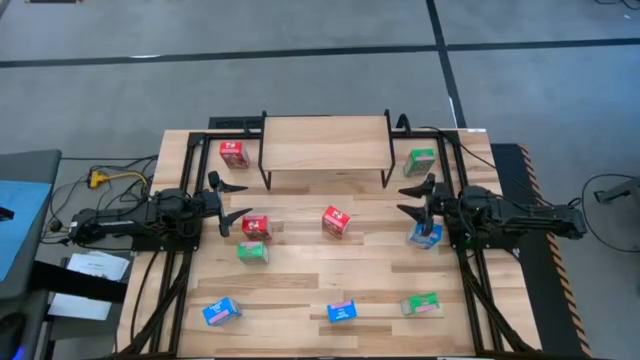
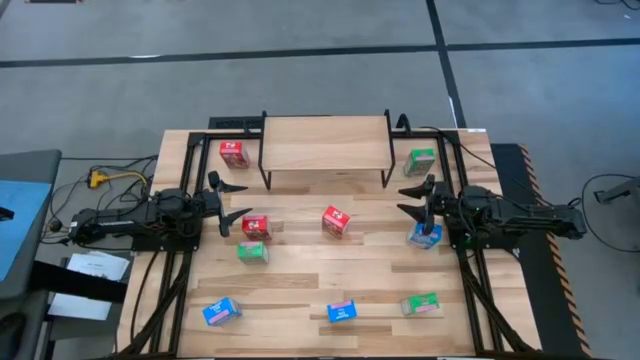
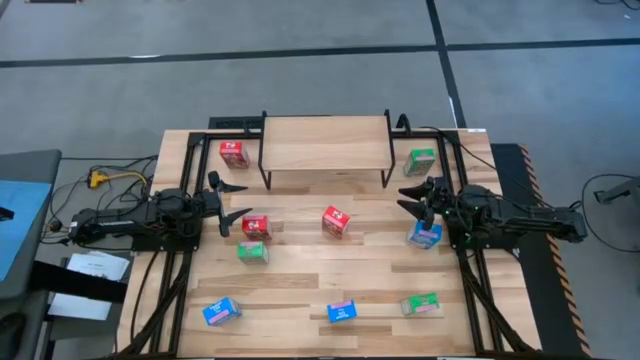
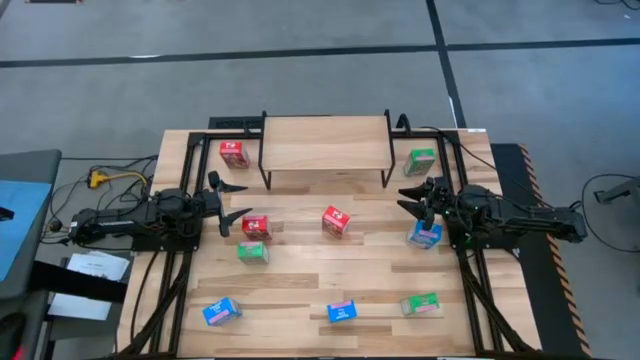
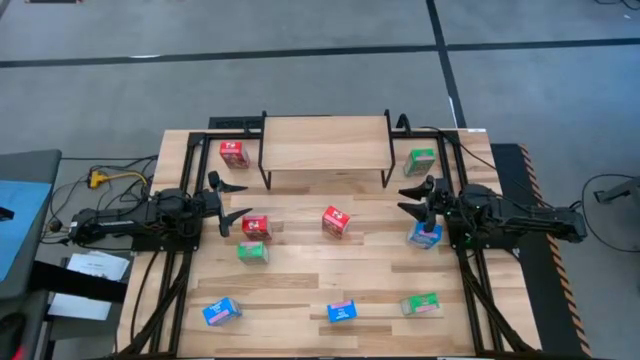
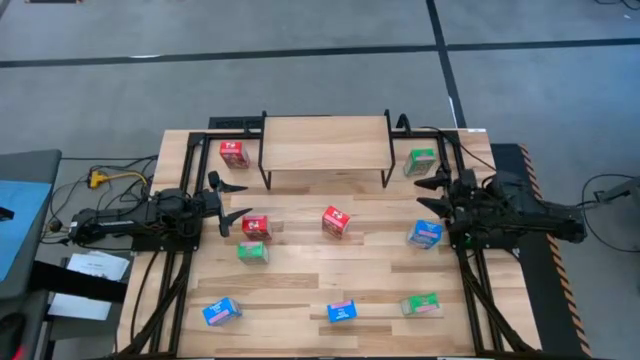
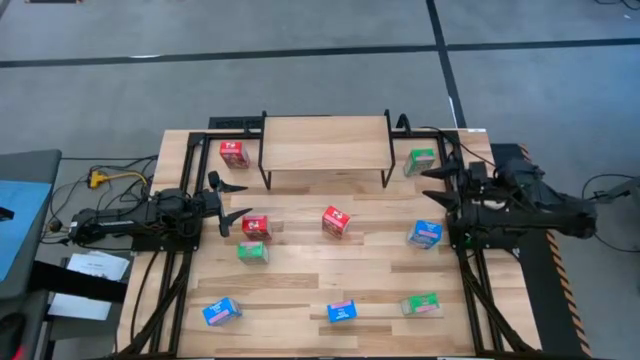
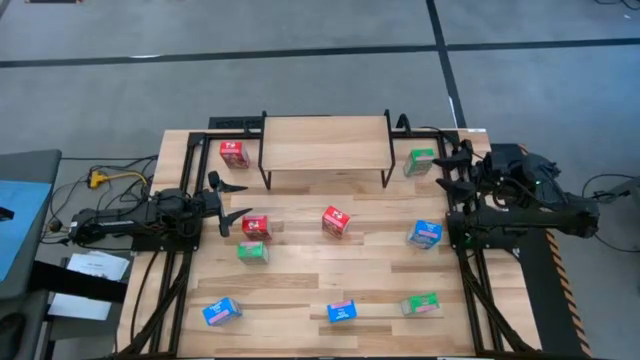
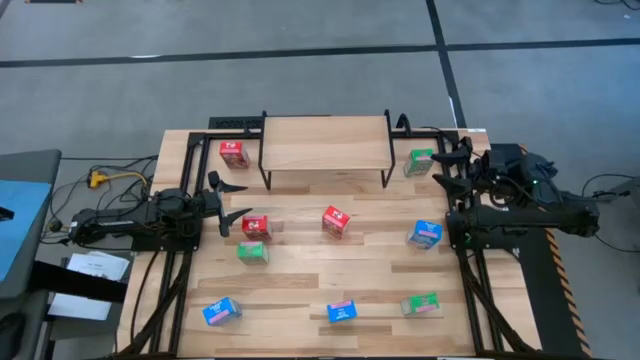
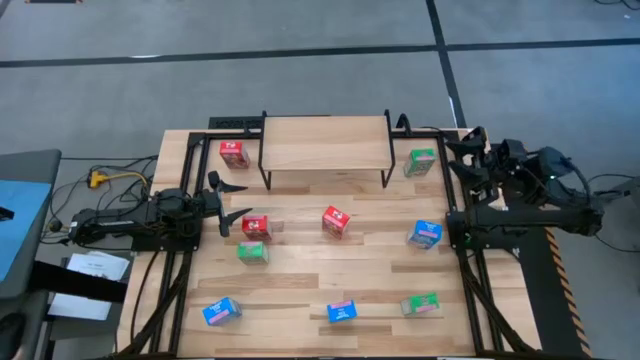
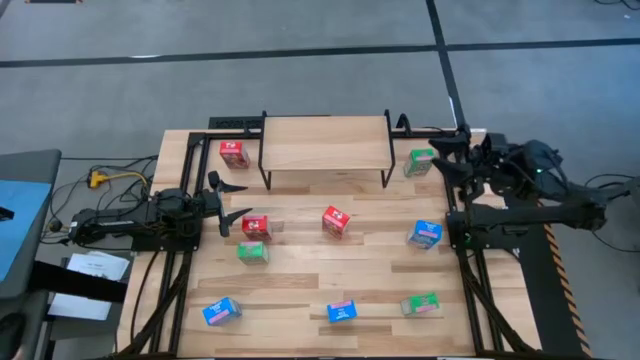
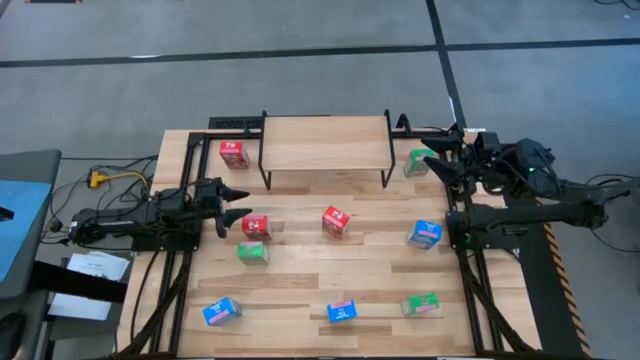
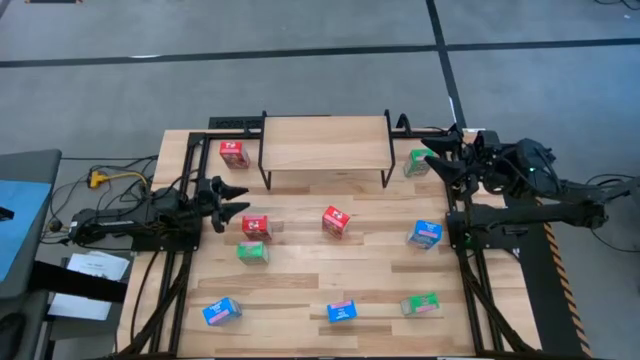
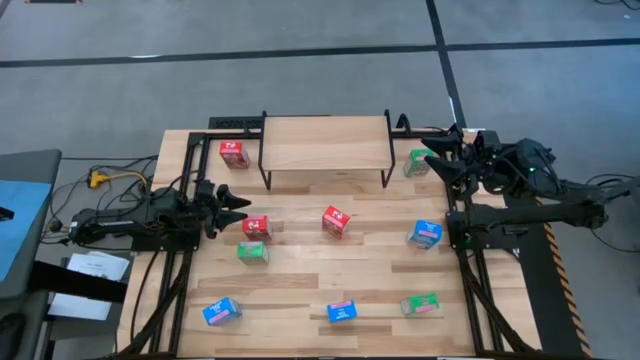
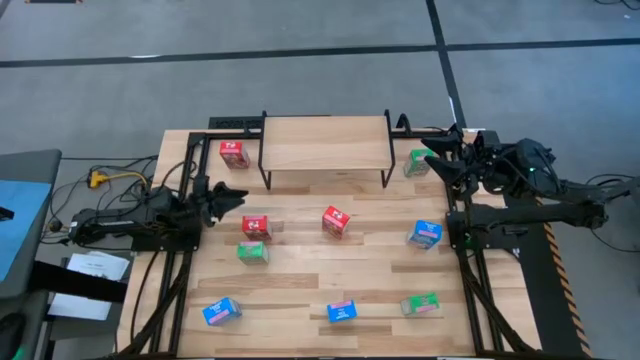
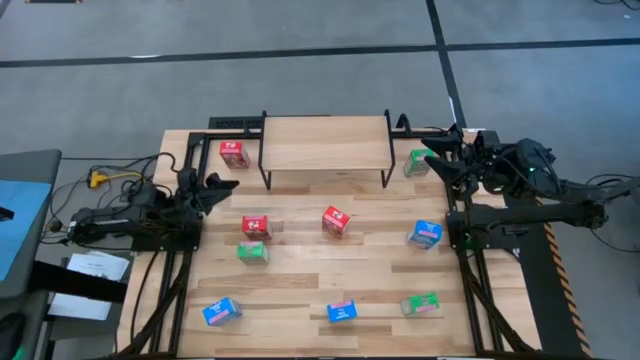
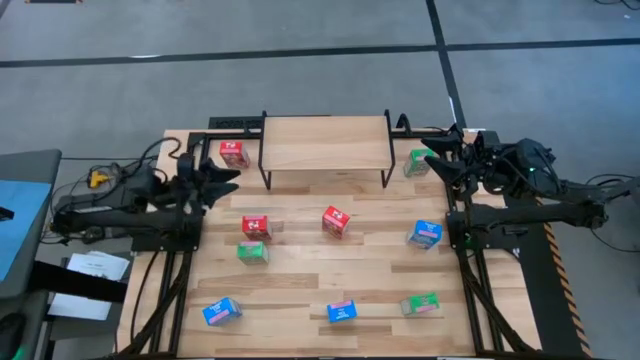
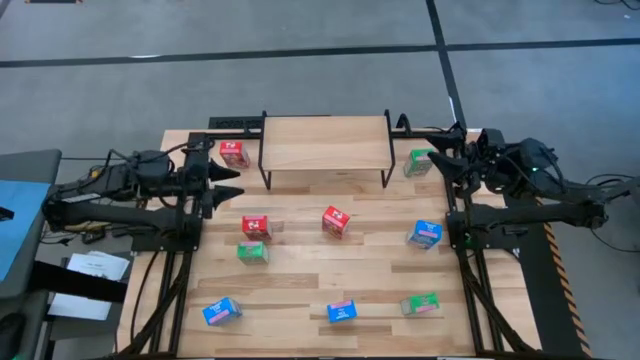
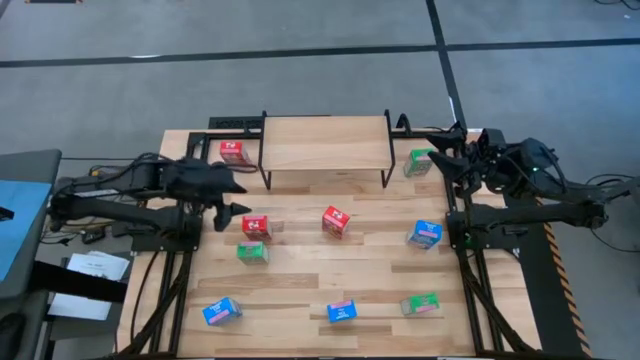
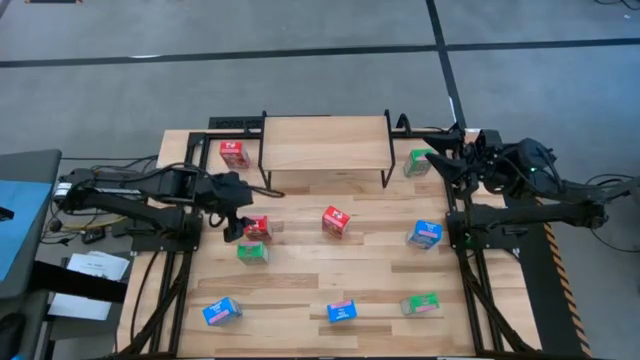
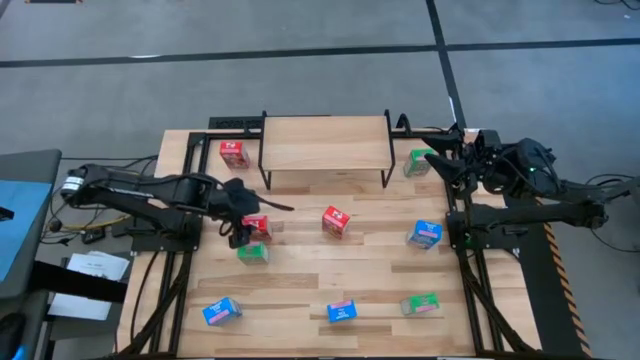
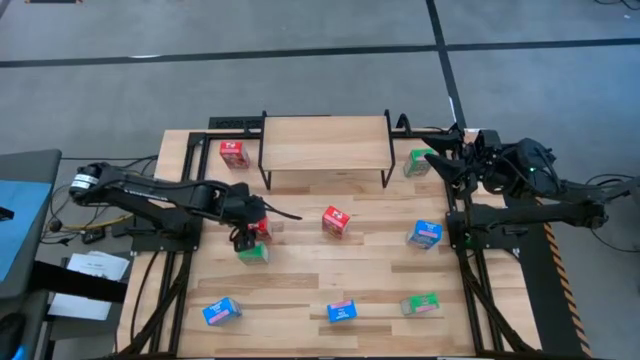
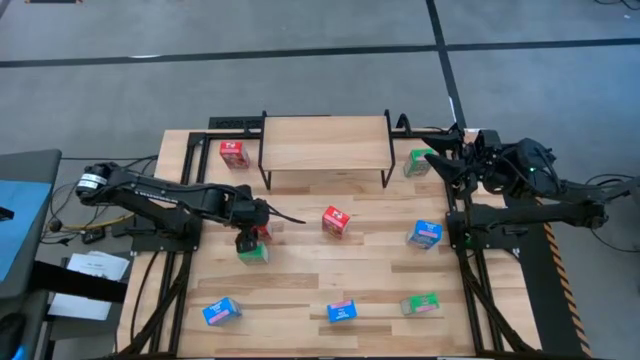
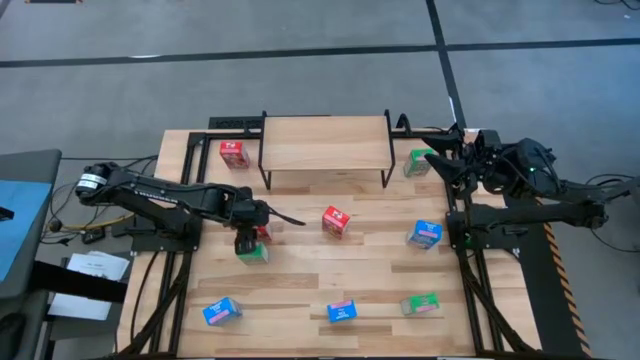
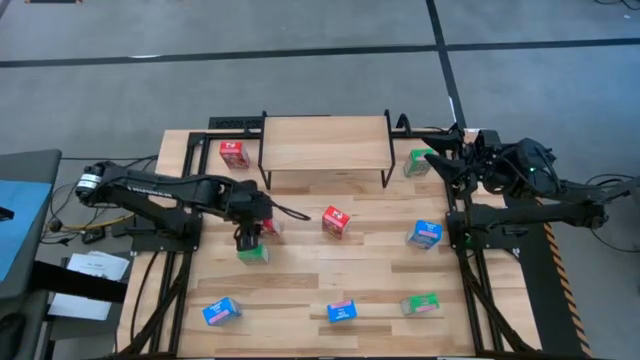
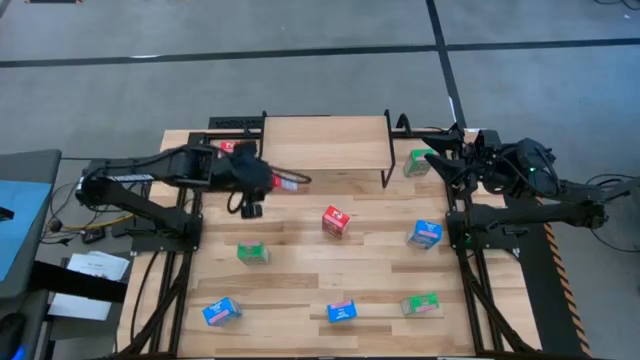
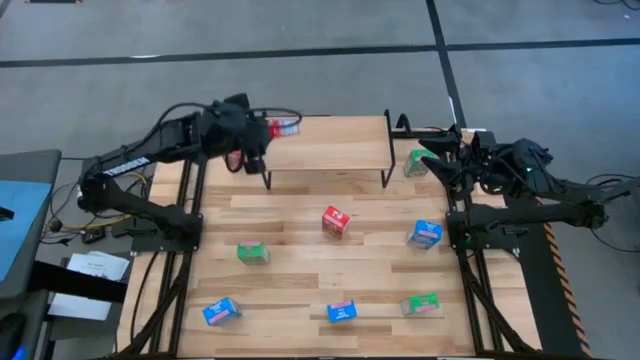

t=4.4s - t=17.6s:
Task: Stack cereal on shelf
Put the middle left red cereal box on the shelf

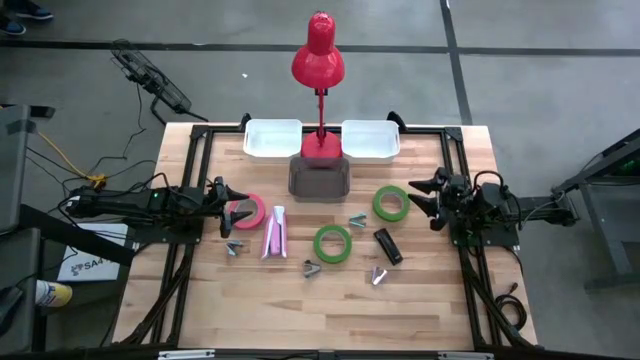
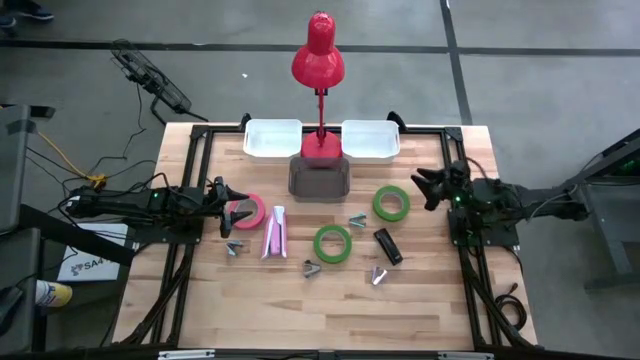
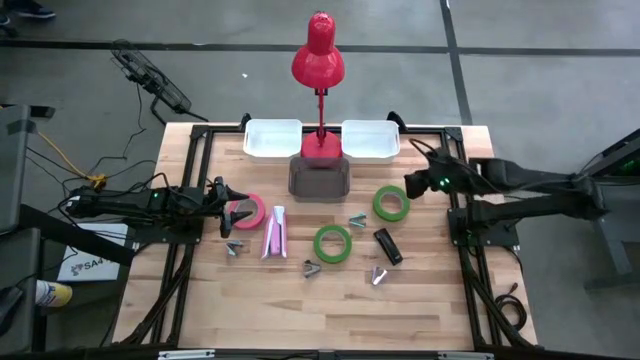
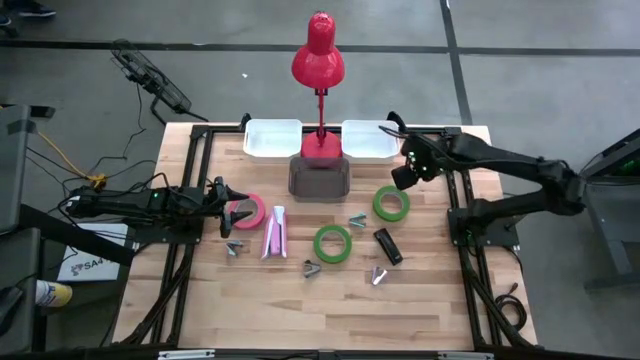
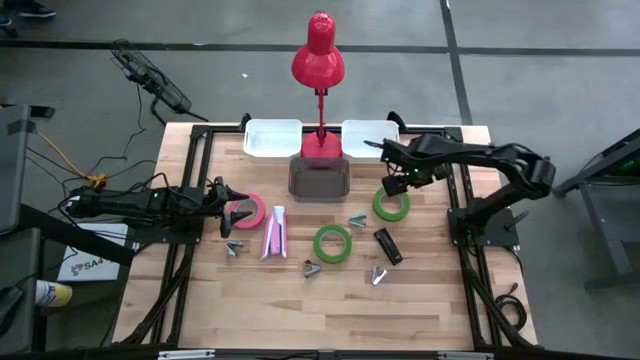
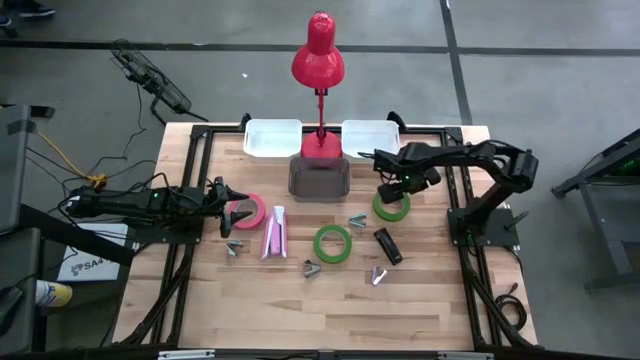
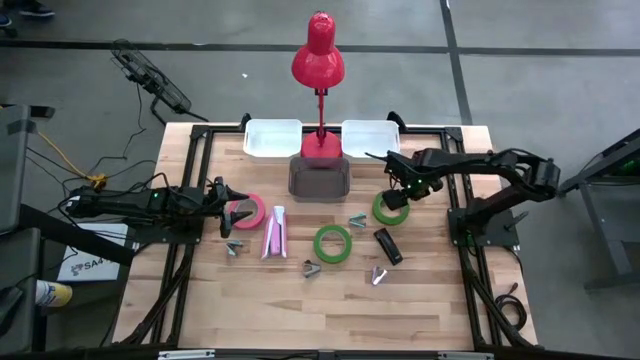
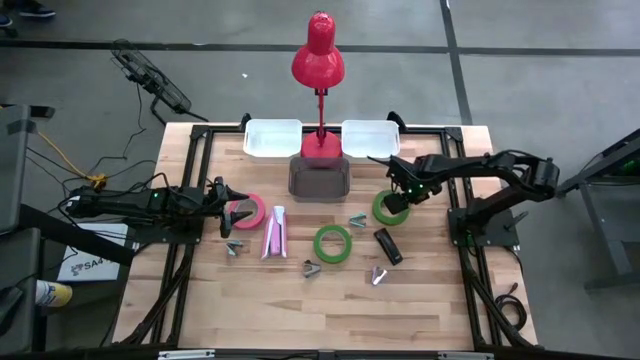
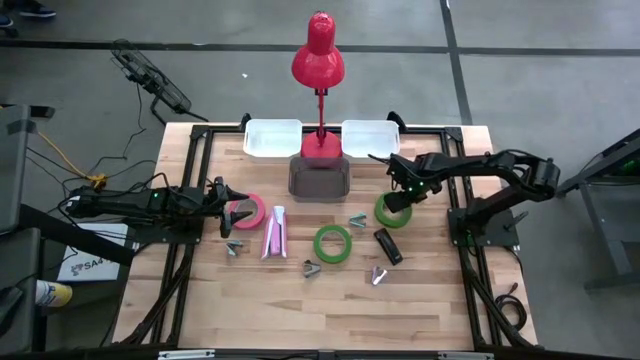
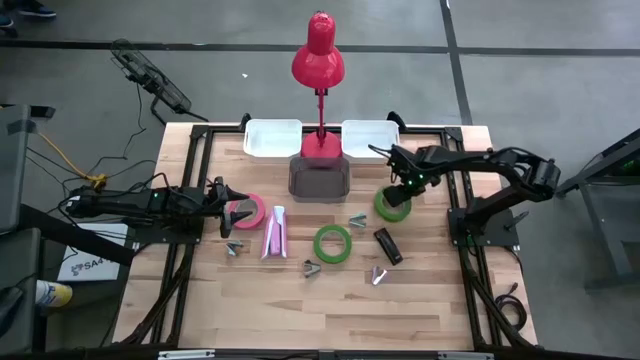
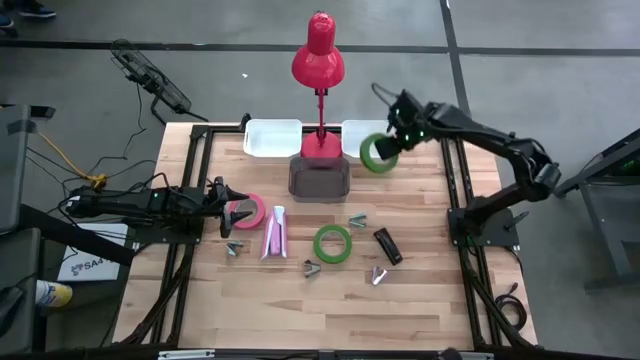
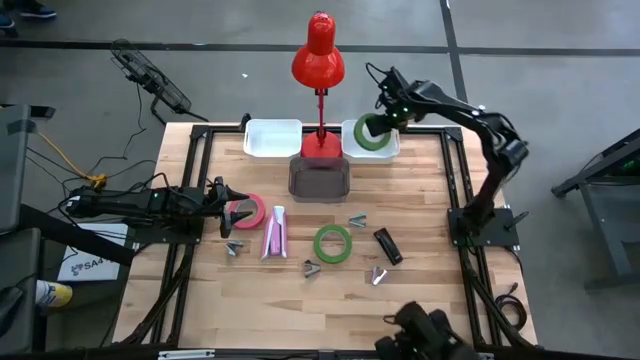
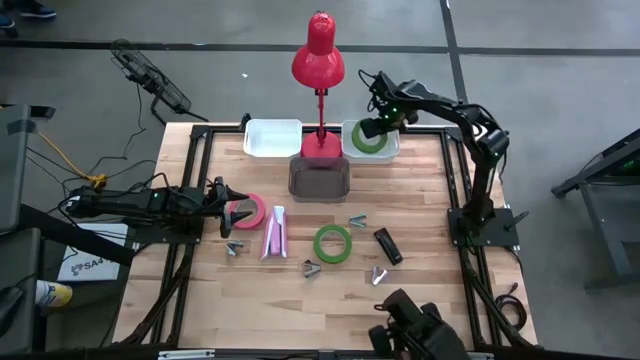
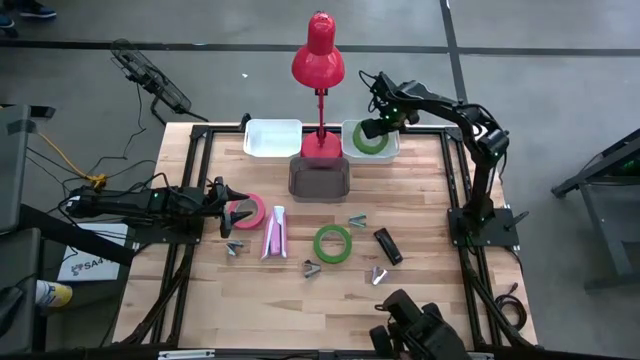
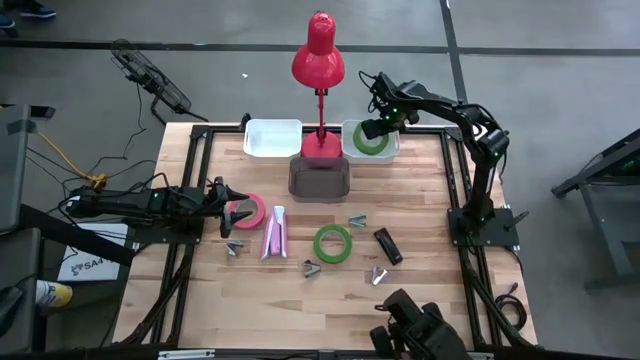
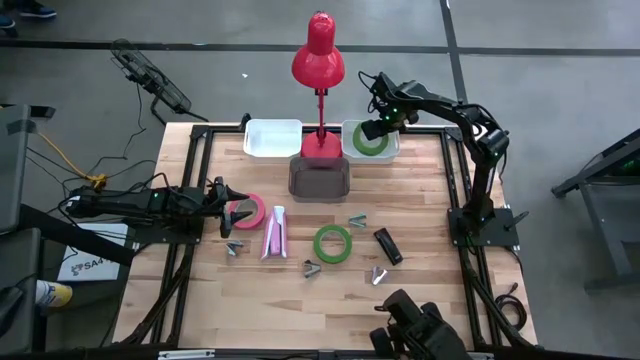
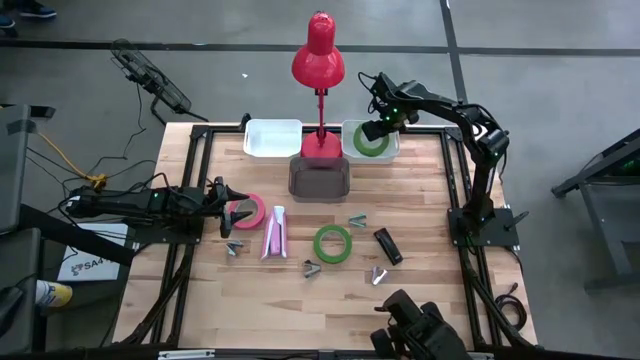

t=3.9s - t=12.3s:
Task: Pick and place Stapler, Stapler remover, tape
Put the top green tape into the right white bin
